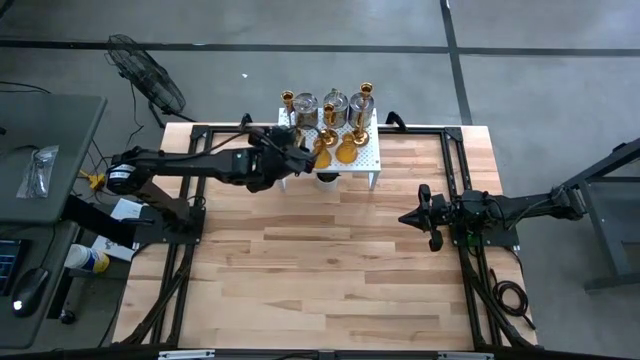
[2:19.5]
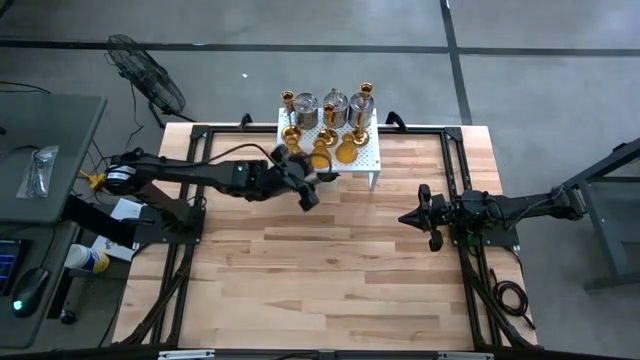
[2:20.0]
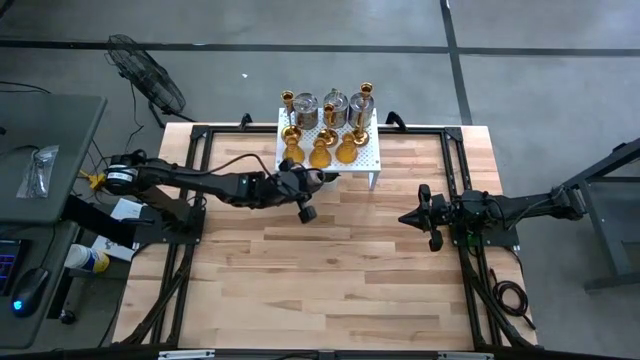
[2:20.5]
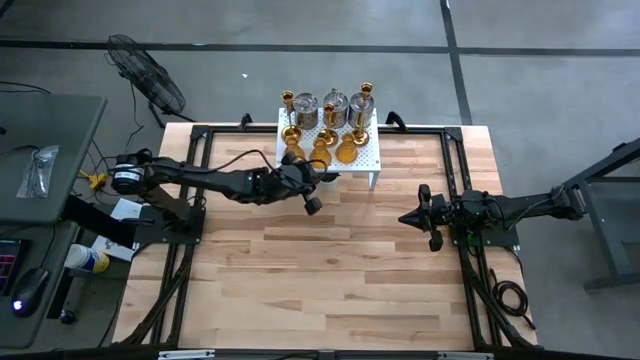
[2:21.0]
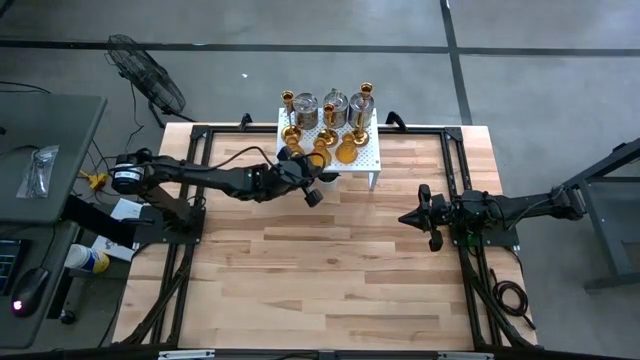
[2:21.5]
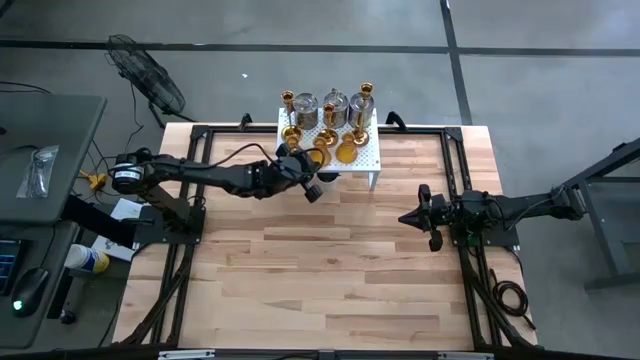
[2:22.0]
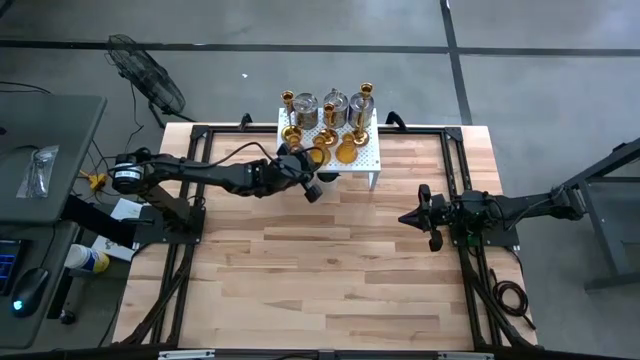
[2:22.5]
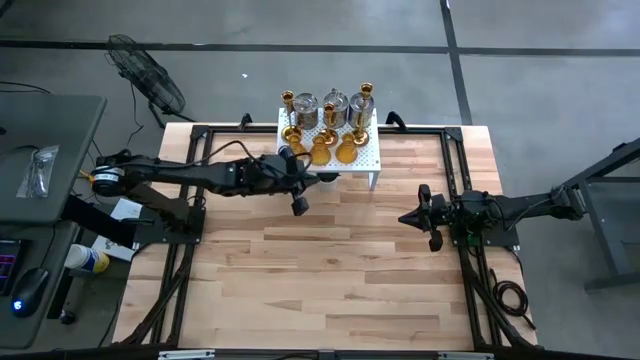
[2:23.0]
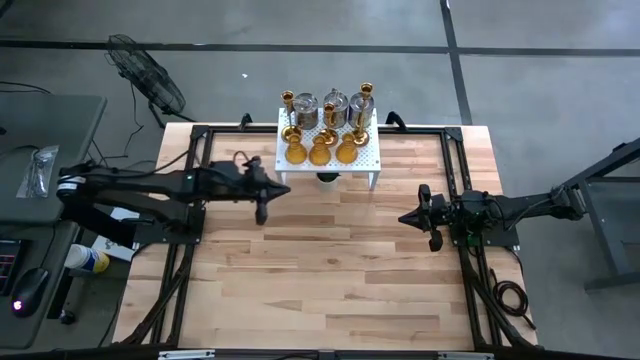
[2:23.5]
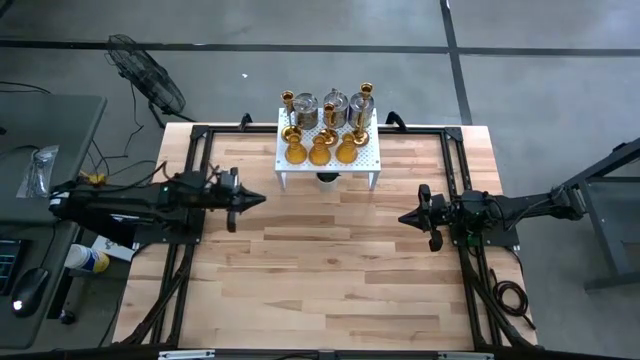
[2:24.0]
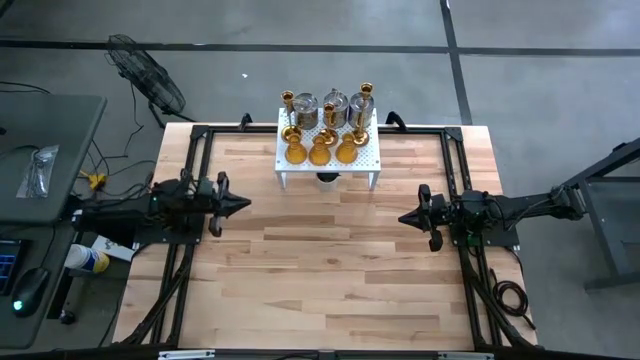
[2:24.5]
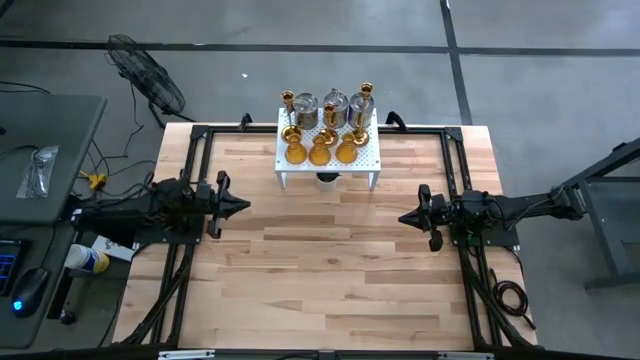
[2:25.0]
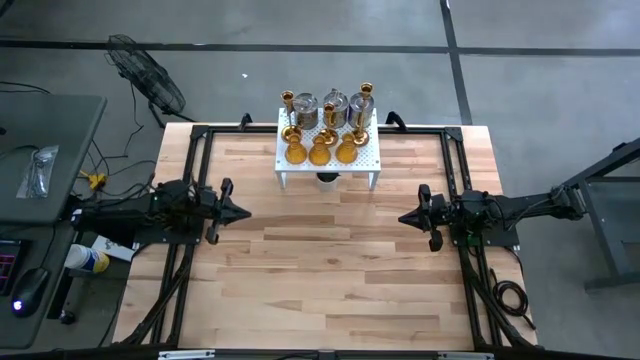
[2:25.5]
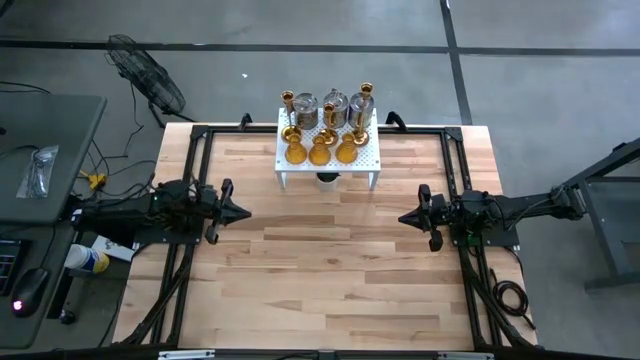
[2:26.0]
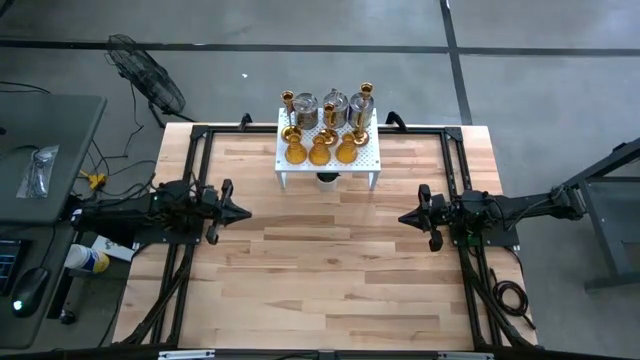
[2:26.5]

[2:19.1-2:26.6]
Task: Pick & Place candle stick holders
Return to Home Position

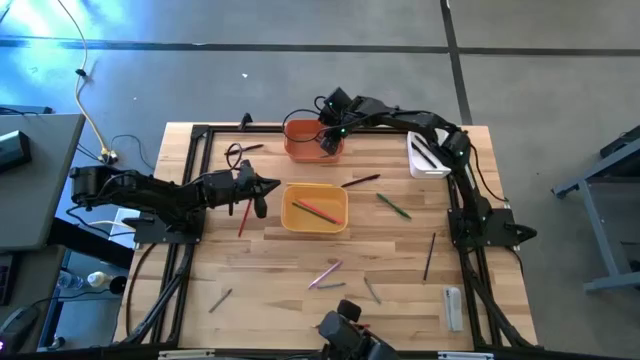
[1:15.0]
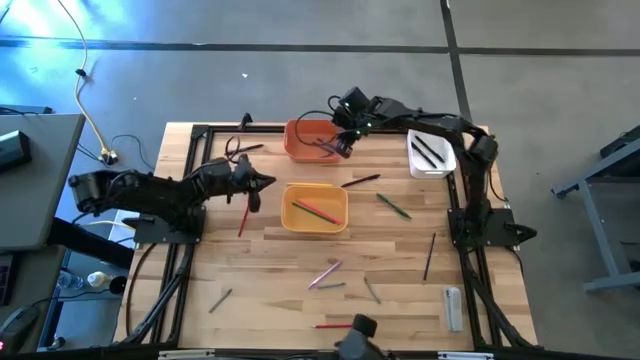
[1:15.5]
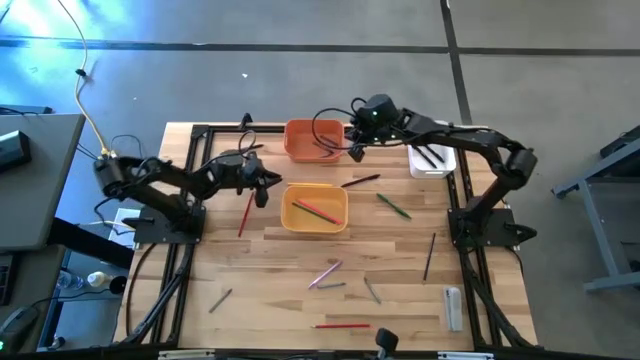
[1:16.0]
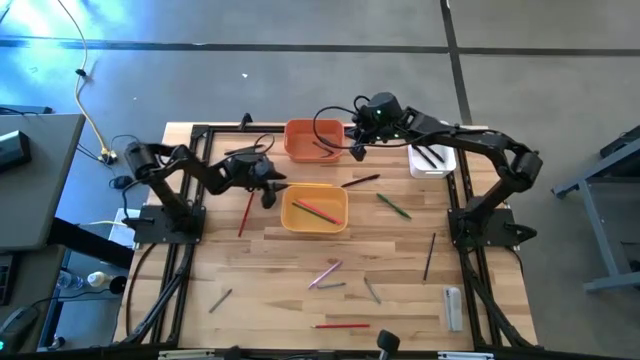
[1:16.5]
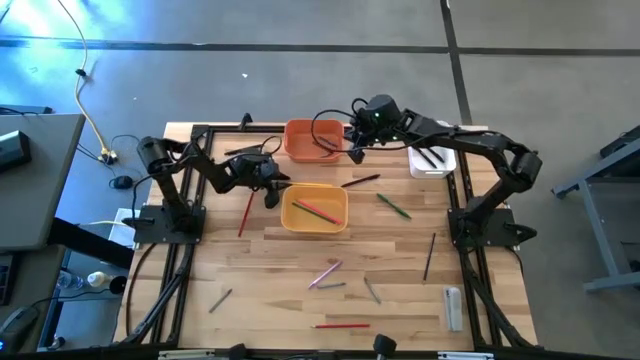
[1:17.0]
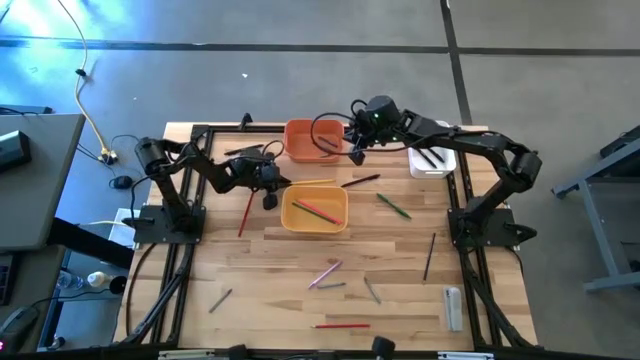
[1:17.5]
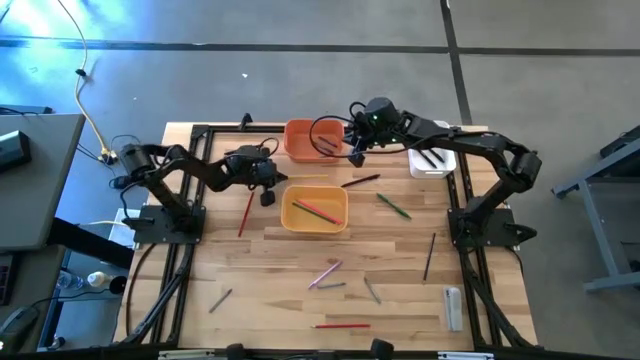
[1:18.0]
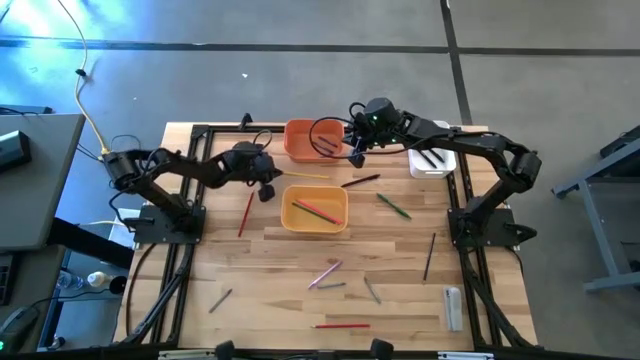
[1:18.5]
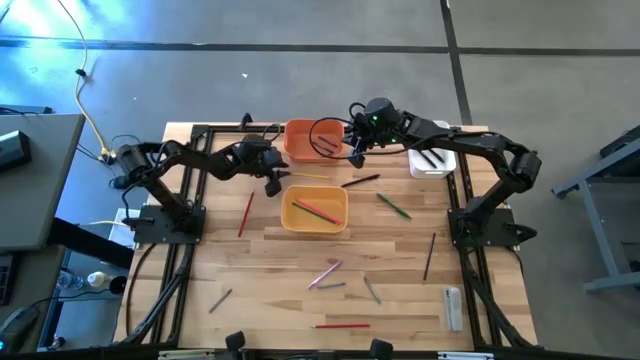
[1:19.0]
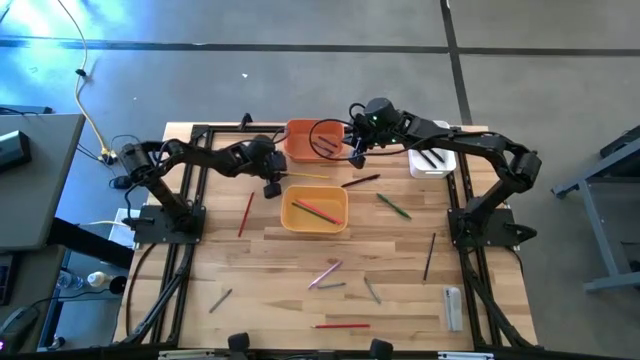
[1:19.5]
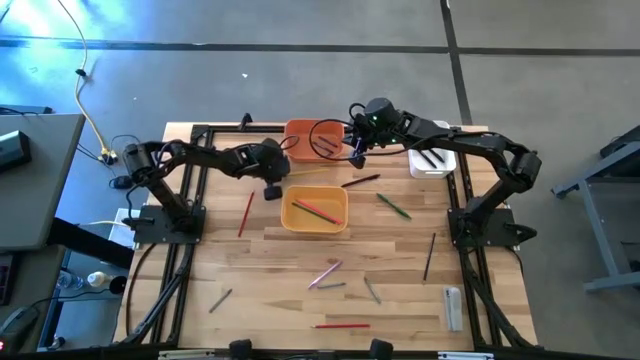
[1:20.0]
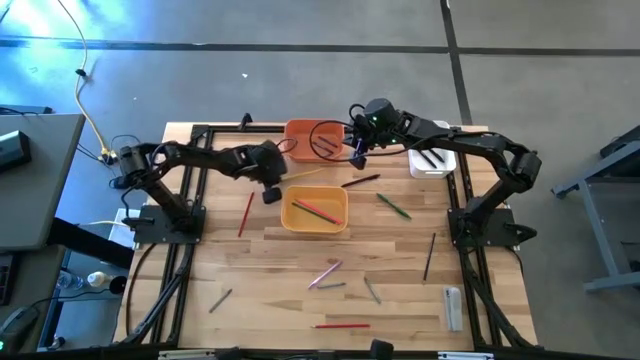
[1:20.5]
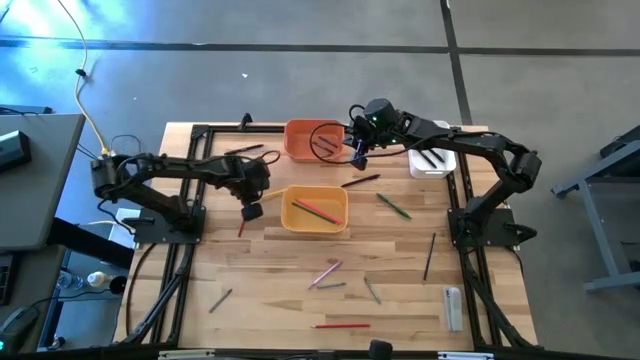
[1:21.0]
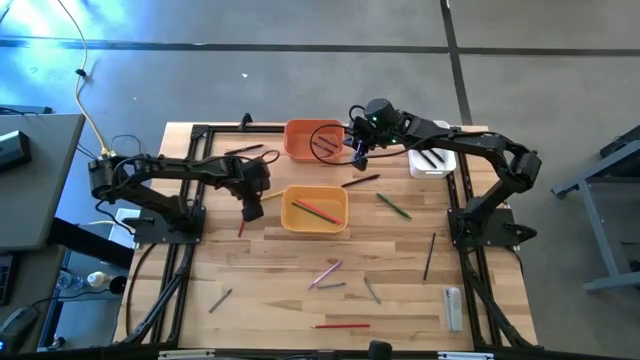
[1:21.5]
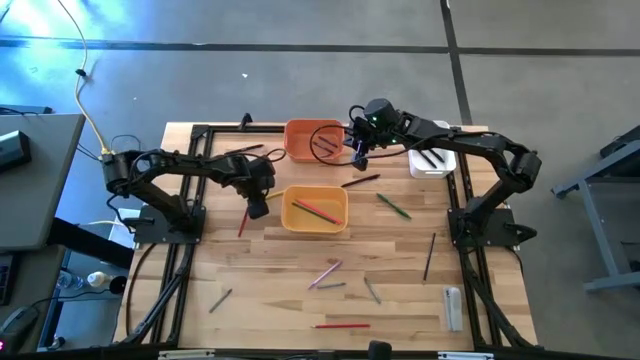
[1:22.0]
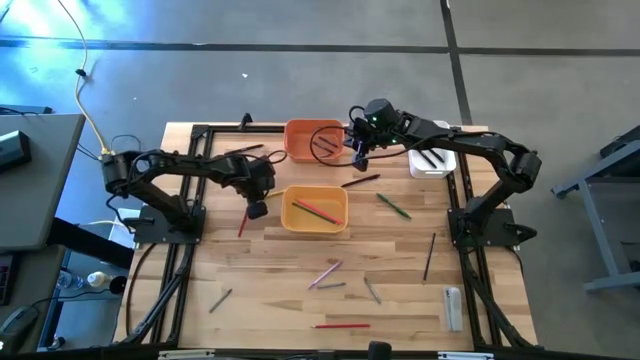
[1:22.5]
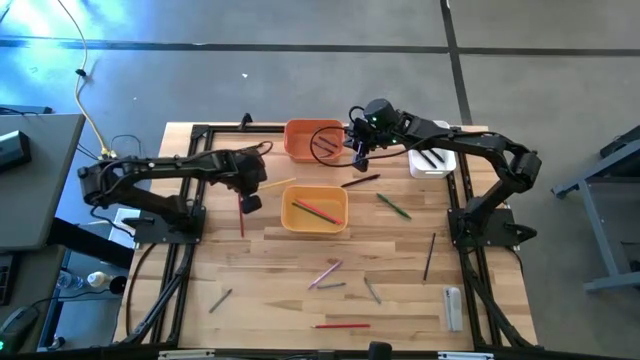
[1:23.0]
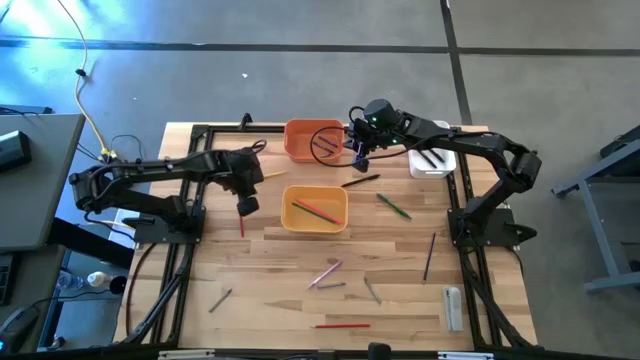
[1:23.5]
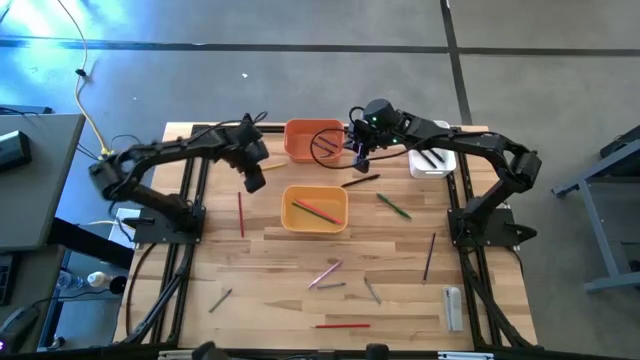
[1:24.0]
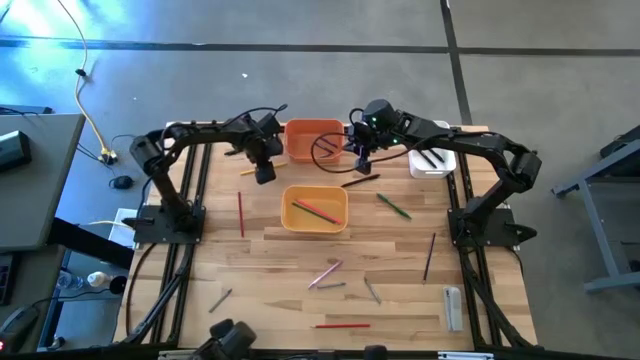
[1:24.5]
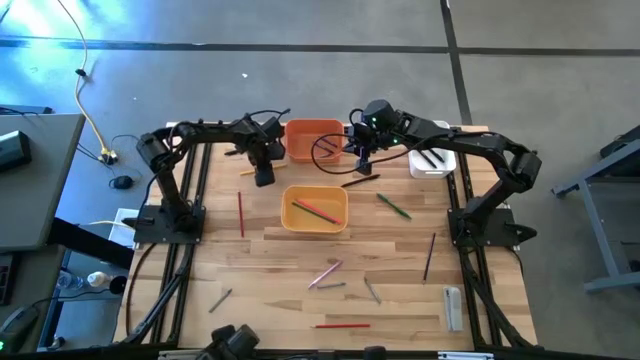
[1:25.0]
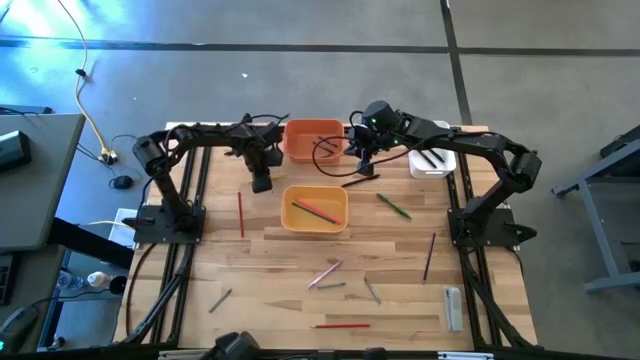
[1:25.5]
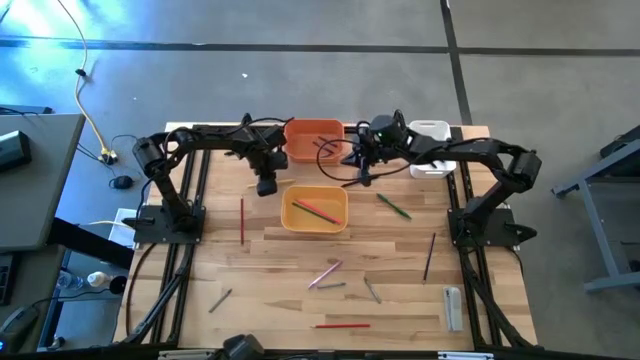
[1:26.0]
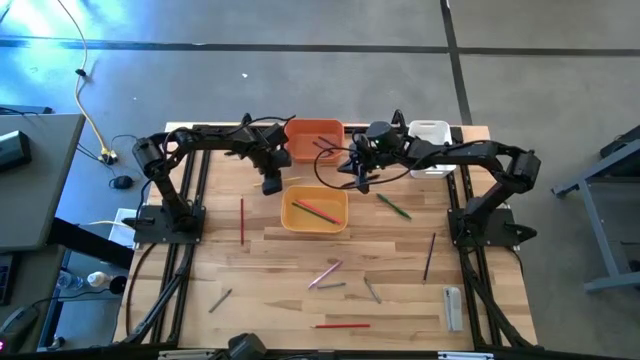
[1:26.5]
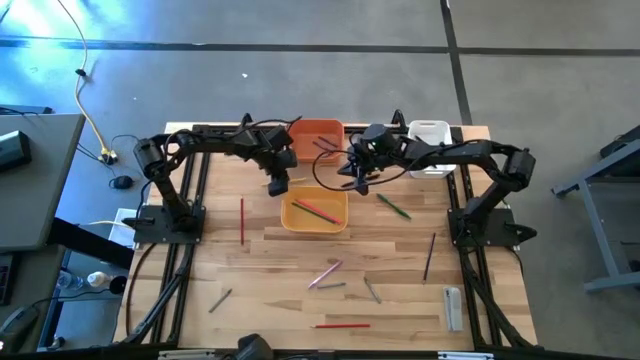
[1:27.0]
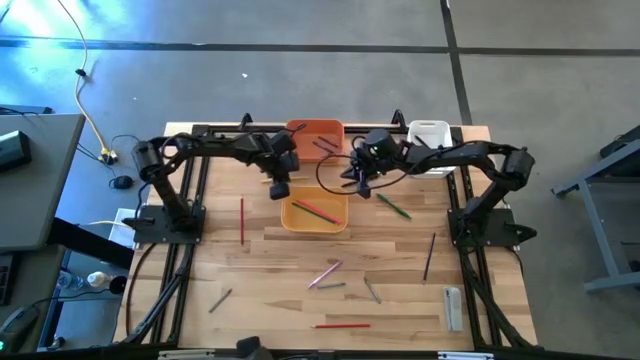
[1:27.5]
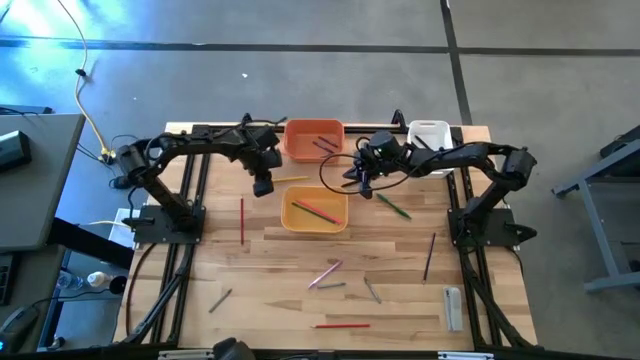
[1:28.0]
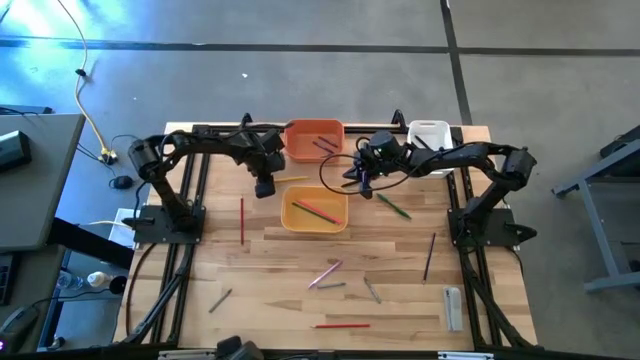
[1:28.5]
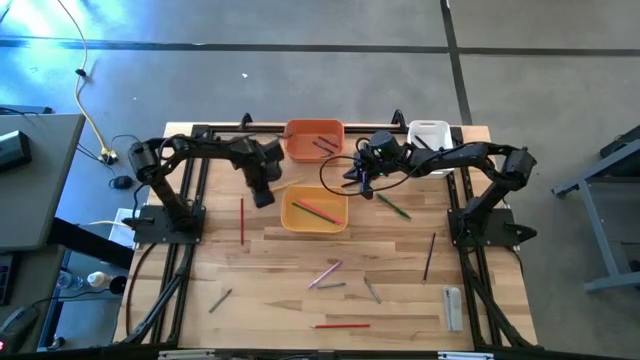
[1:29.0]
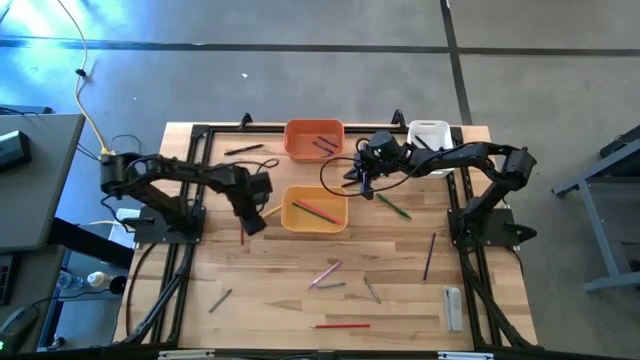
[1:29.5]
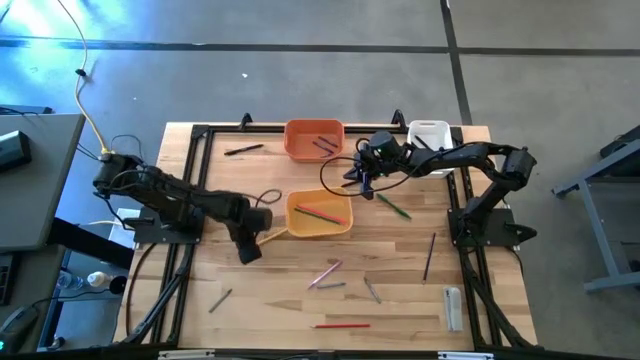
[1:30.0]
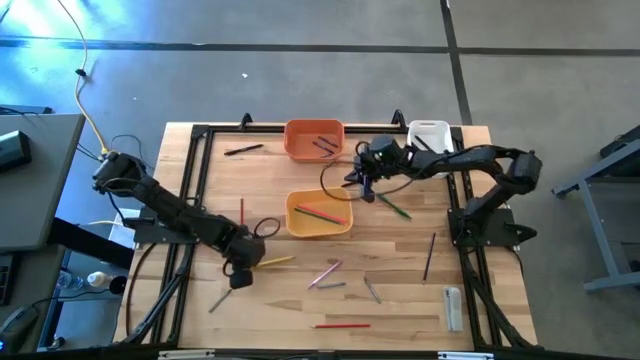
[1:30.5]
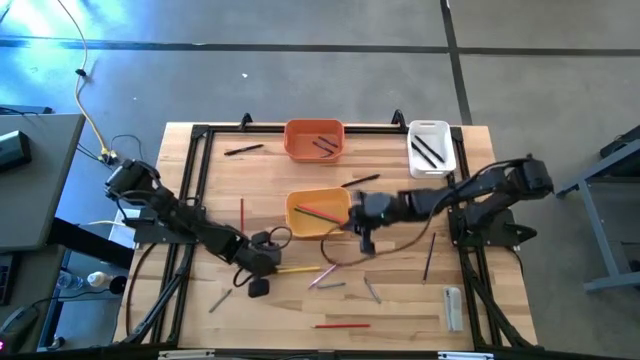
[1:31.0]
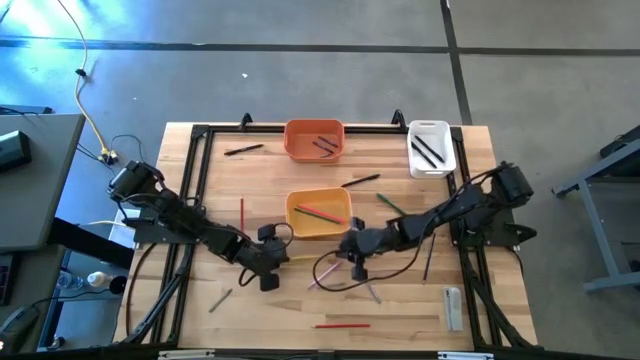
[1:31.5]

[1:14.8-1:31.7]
Task: Sort crayons/erasers/pens/pencils in bins
Put the yellow pencil into the yellow bin
